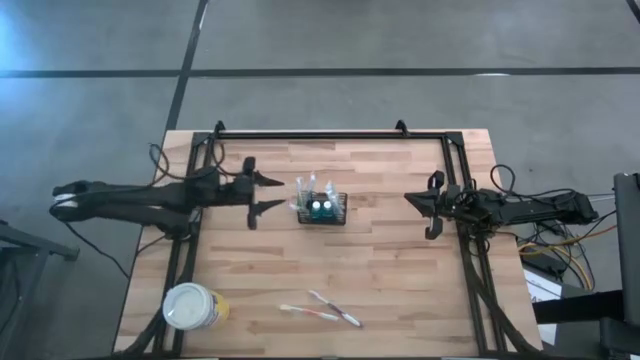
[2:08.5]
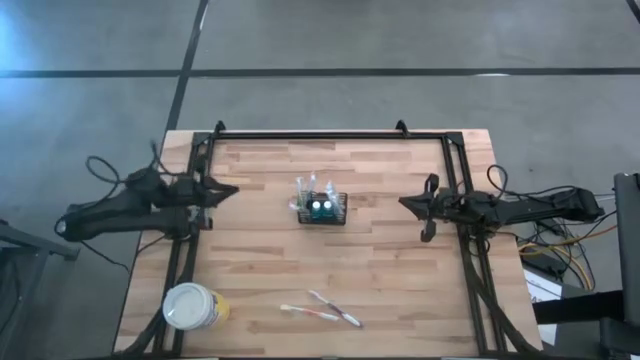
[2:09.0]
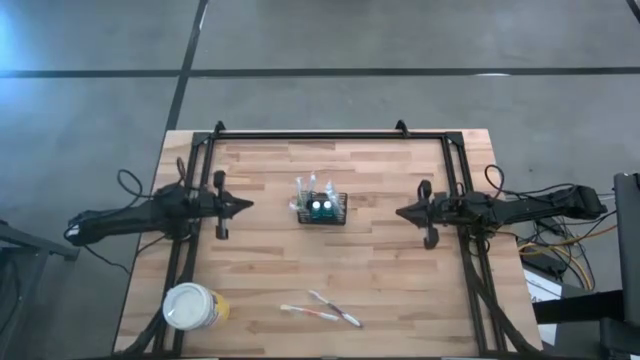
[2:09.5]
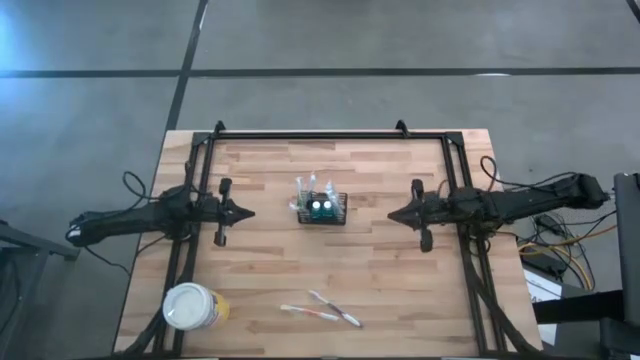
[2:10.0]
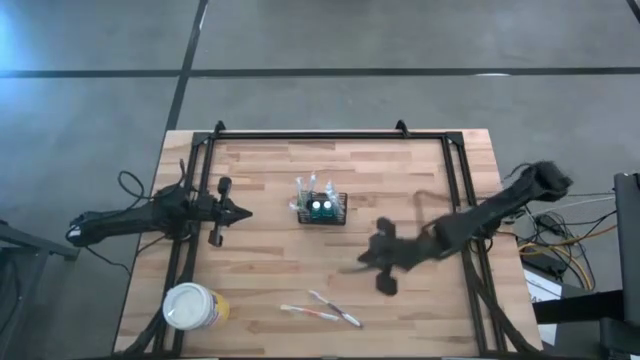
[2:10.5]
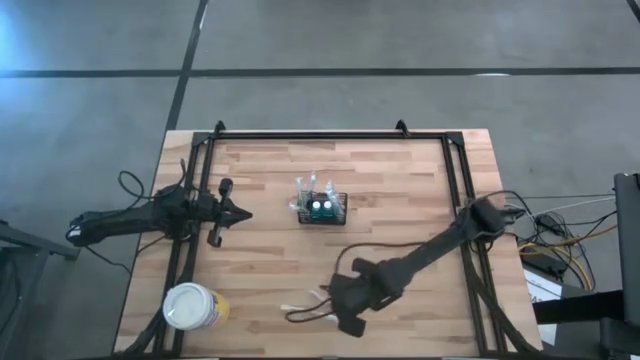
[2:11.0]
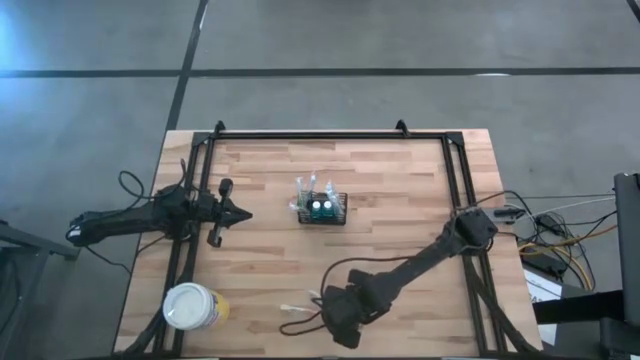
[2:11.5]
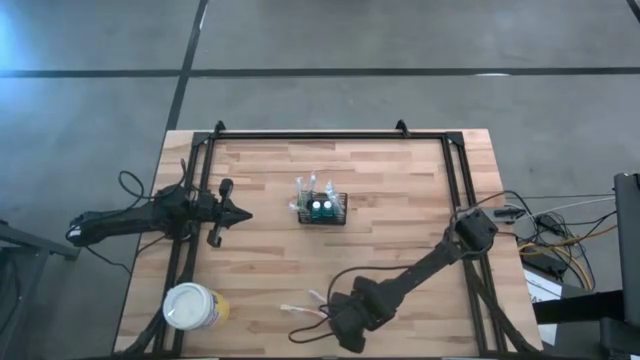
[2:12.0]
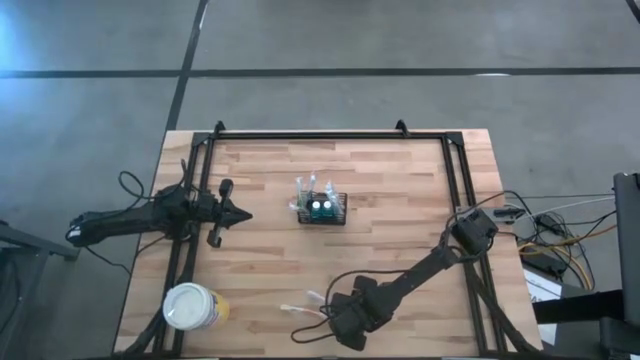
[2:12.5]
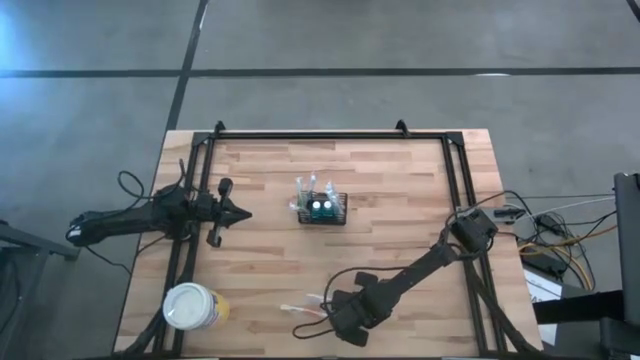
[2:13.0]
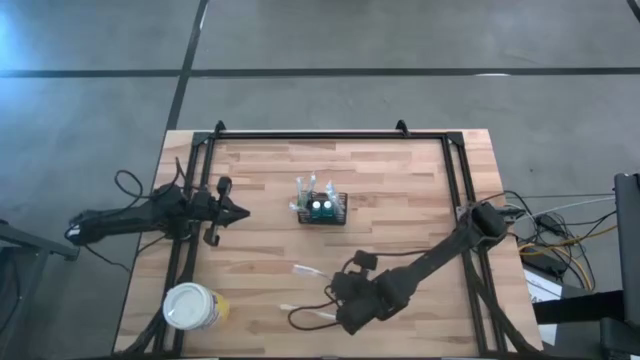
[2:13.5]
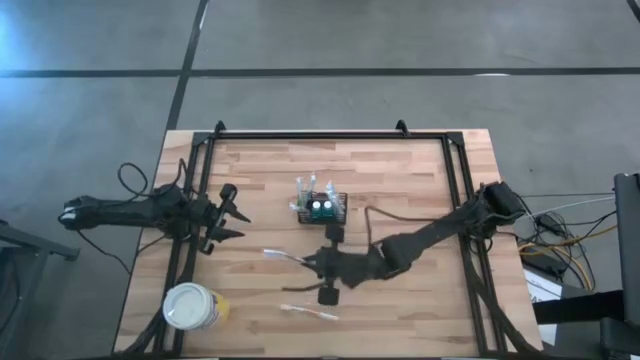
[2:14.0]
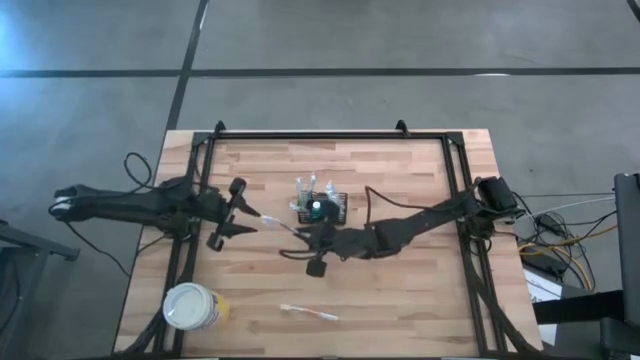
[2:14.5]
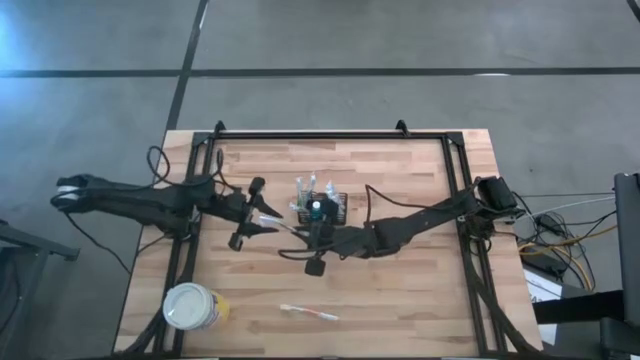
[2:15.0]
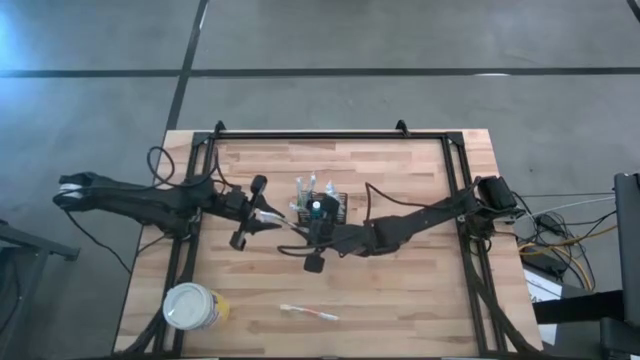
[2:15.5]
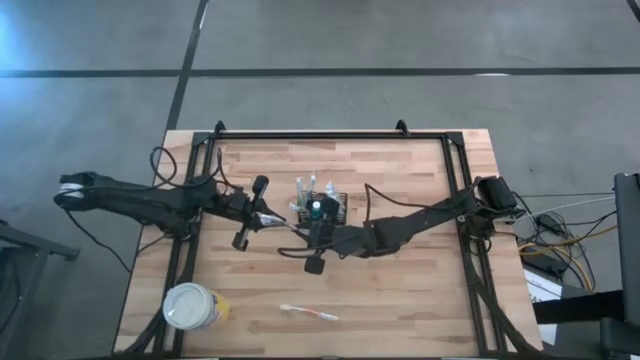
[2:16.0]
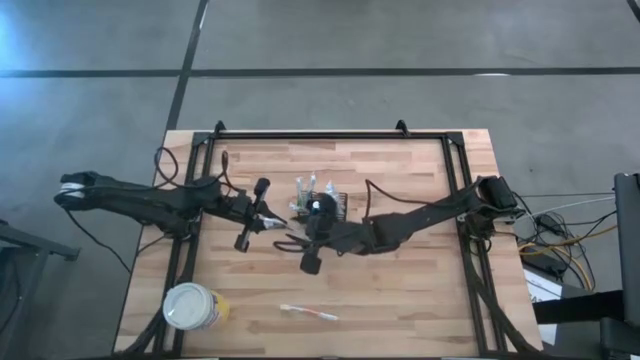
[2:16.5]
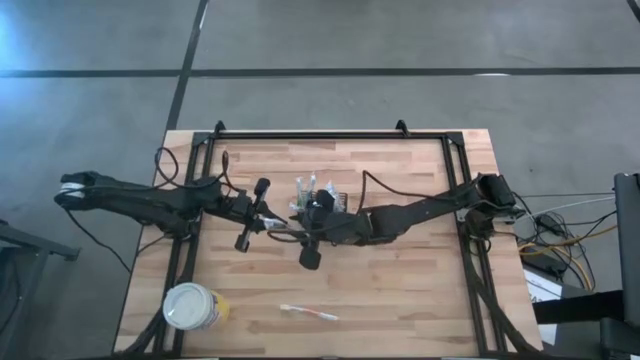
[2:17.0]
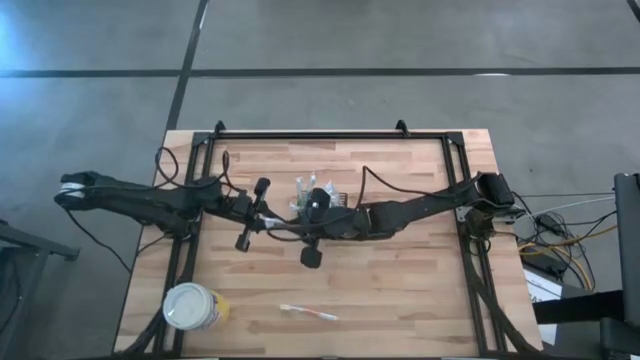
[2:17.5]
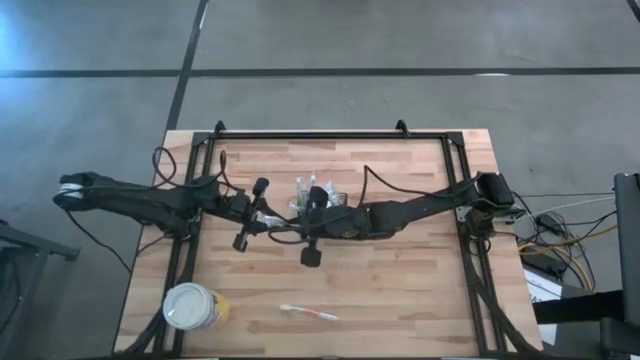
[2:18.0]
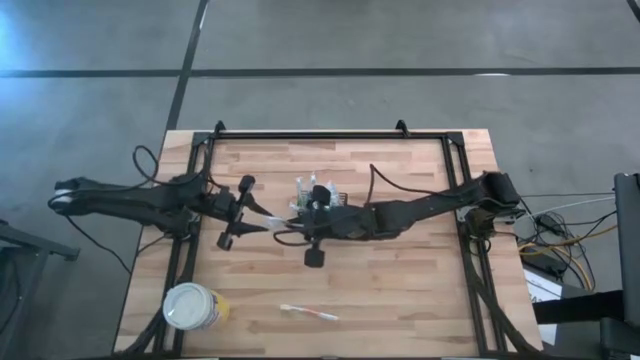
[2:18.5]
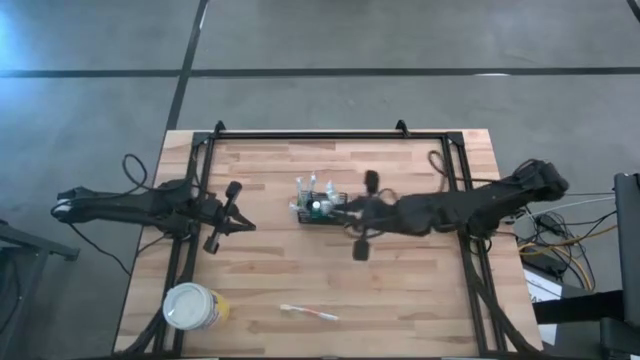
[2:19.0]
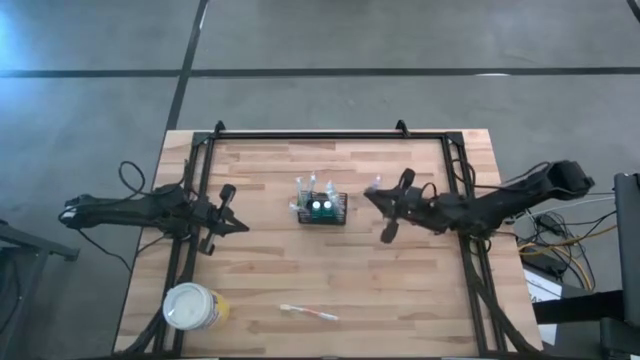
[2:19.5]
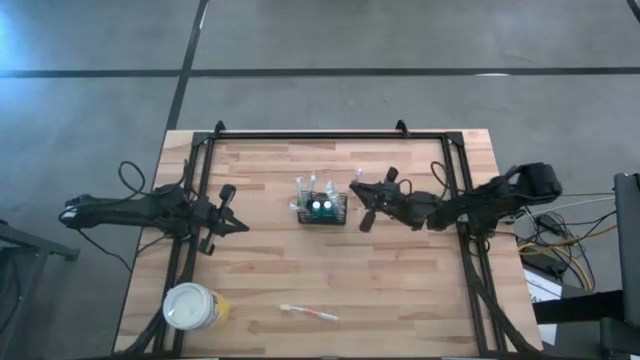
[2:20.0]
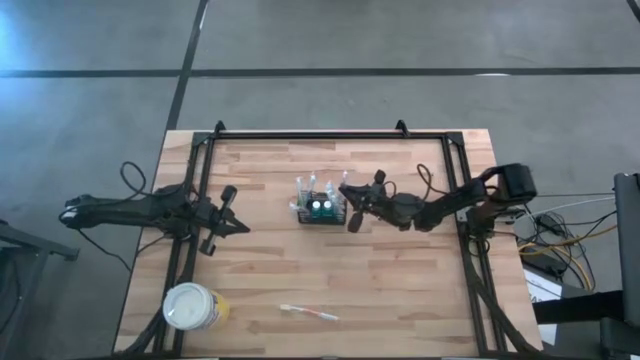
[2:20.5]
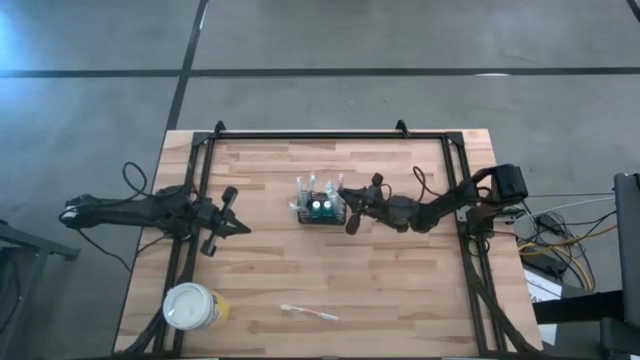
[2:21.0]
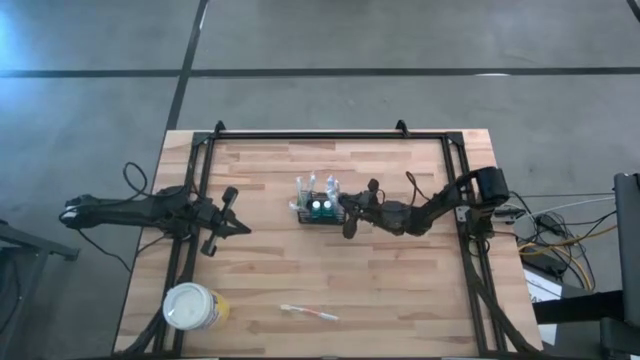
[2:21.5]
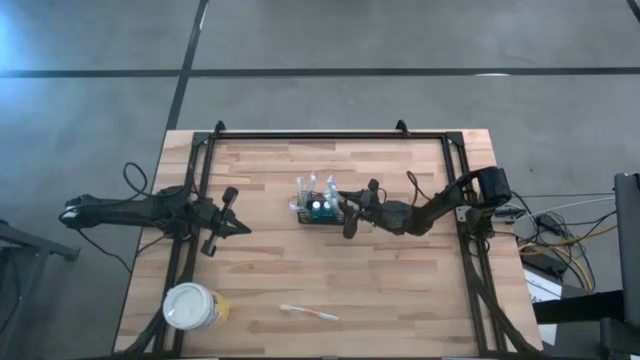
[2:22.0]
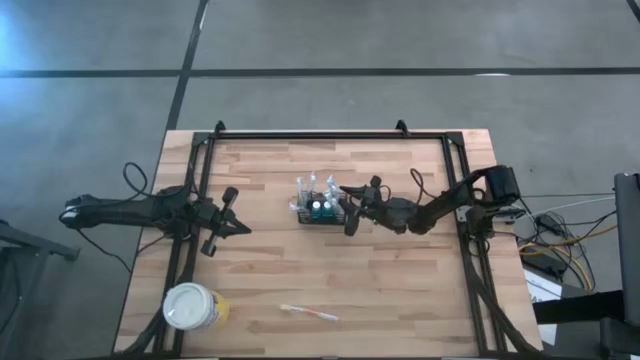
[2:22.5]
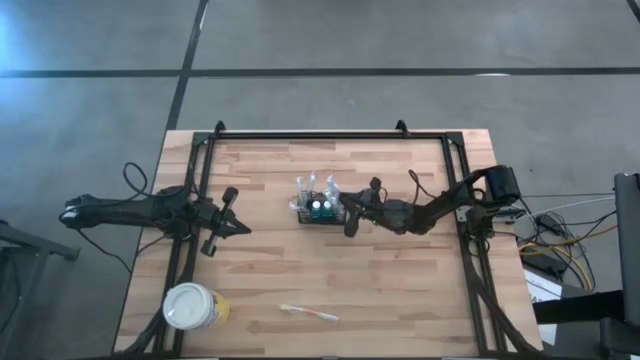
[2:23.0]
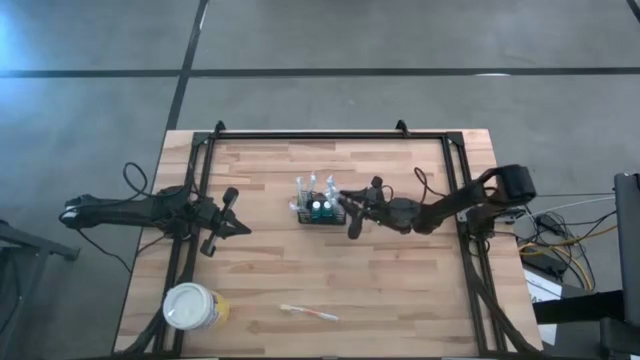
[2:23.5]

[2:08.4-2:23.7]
Task: Pick & Place toothbrushing station
Put the violet toothbrush into the wire organizer

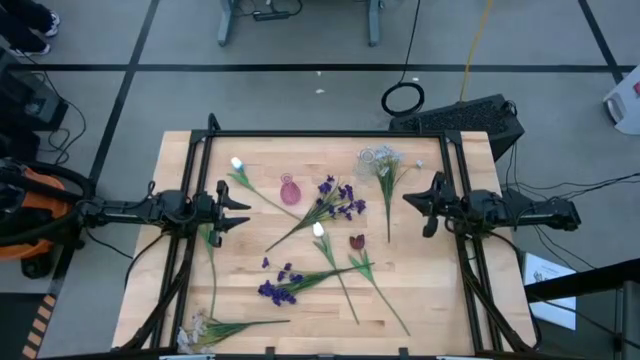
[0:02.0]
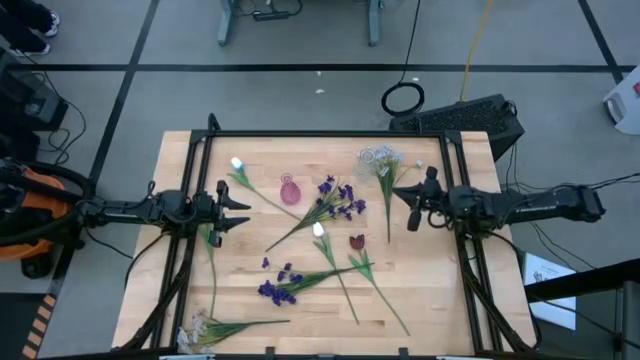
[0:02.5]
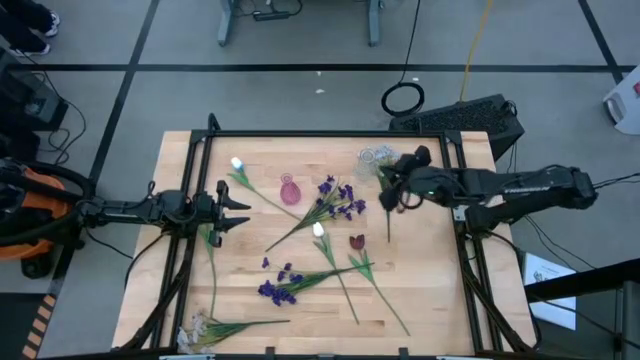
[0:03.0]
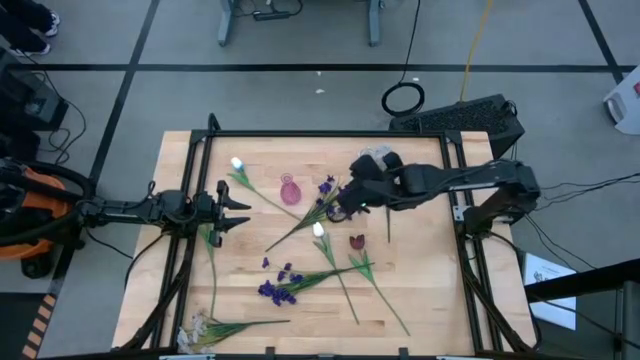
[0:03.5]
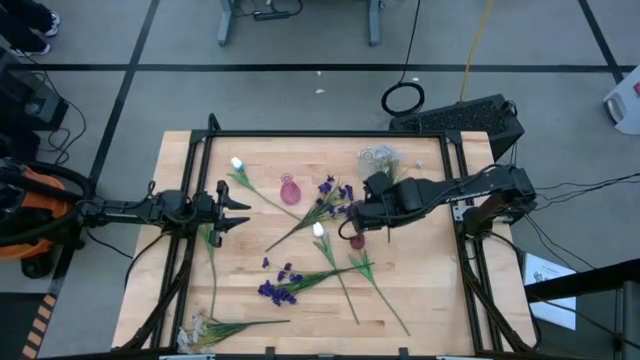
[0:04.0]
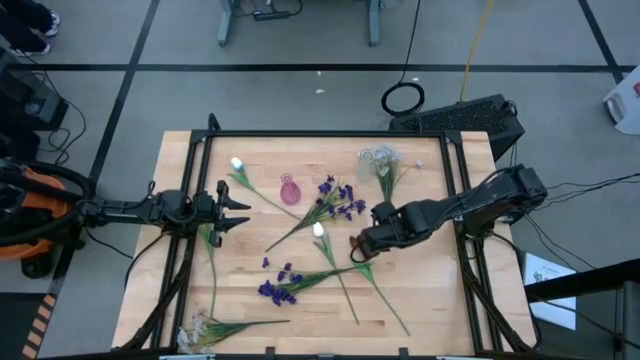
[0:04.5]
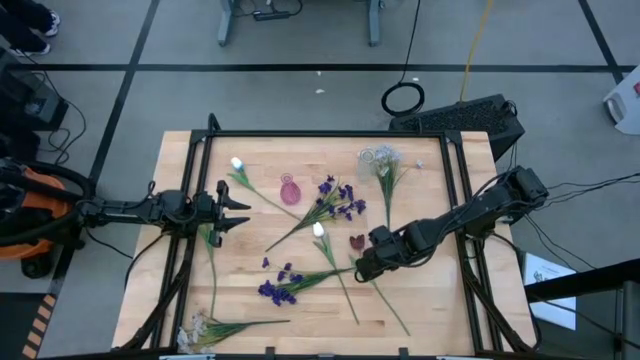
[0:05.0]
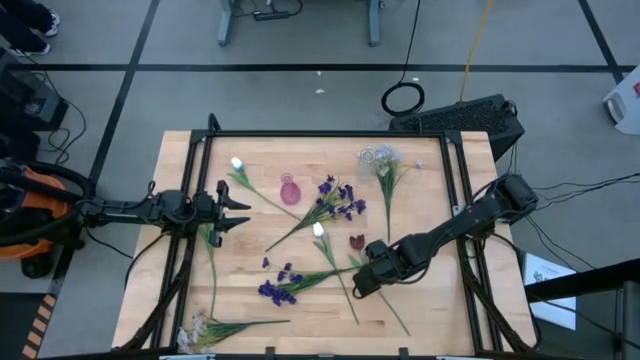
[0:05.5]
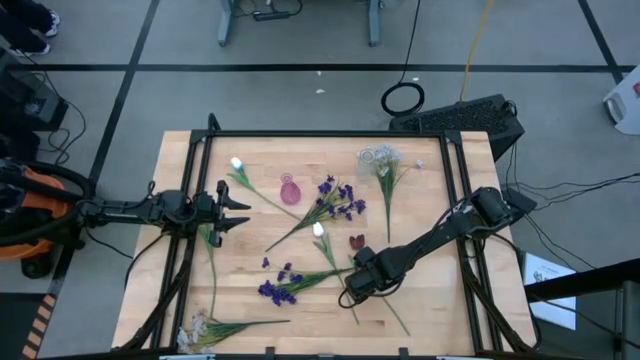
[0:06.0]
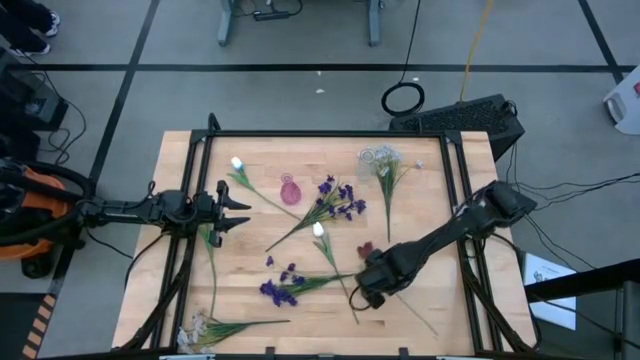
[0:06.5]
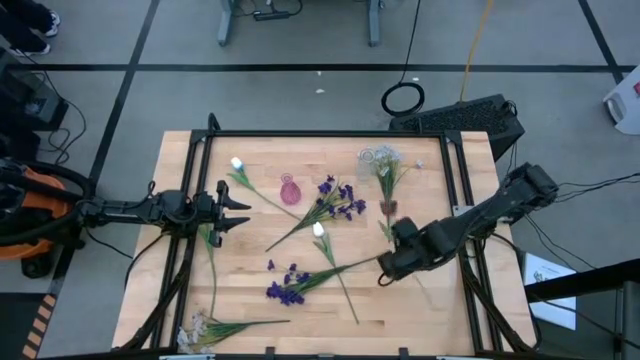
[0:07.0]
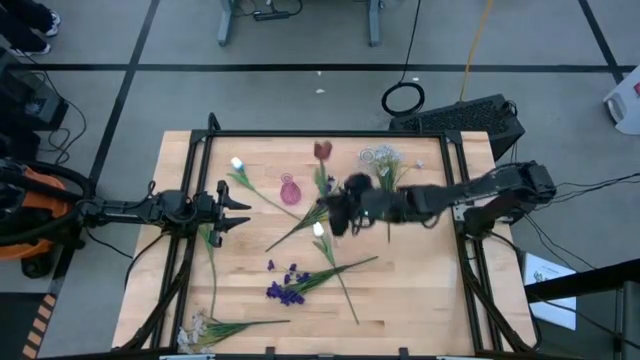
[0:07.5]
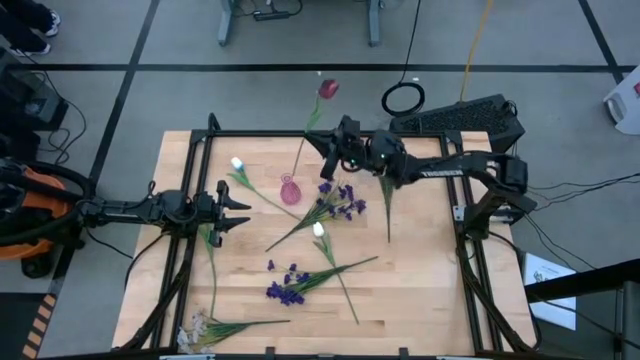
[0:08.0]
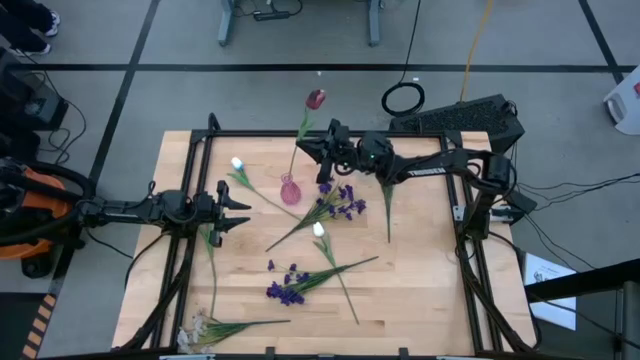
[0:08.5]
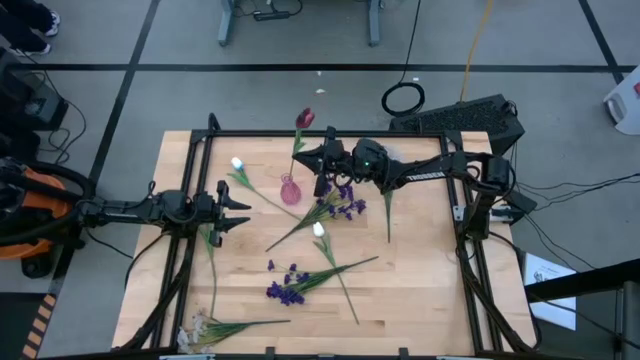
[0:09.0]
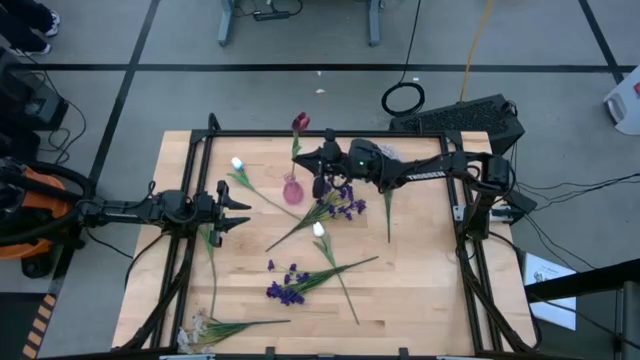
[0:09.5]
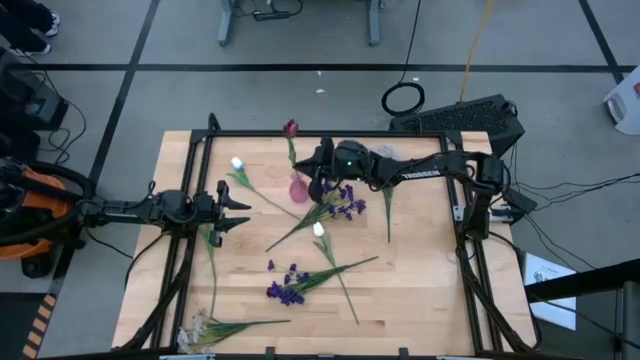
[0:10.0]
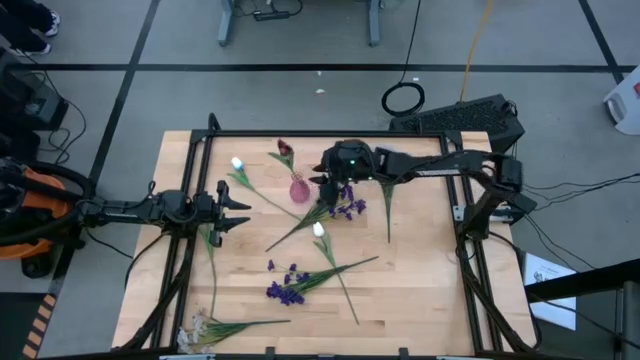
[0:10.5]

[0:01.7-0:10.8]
Task: Sort flowers into vase by color
Put the right red flower into the transparent purple vase
